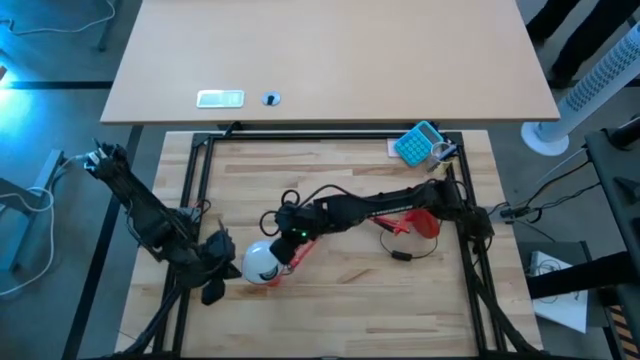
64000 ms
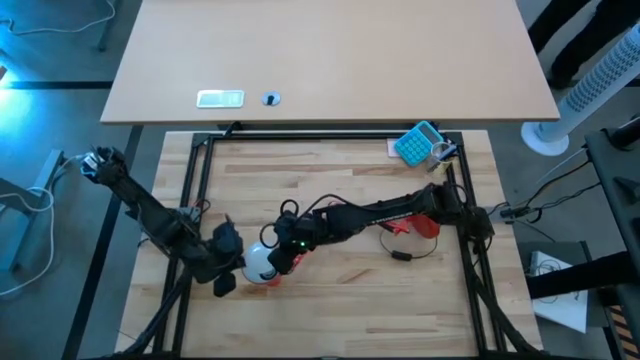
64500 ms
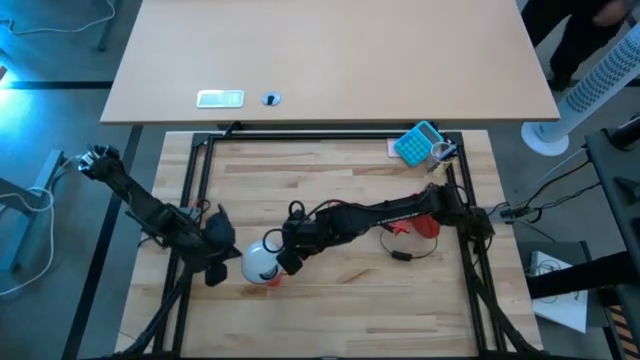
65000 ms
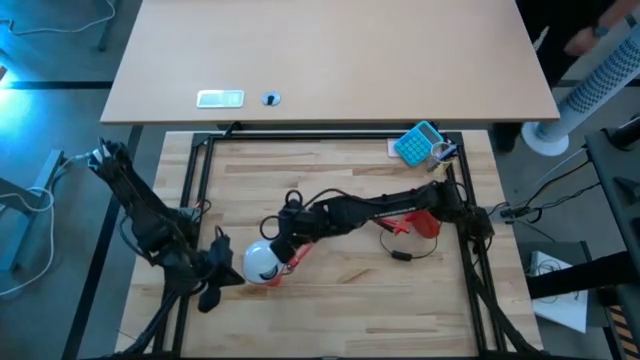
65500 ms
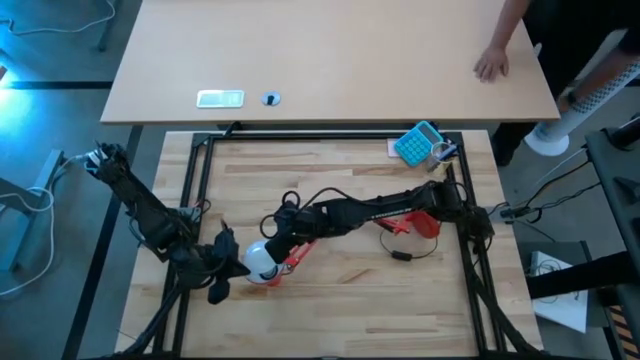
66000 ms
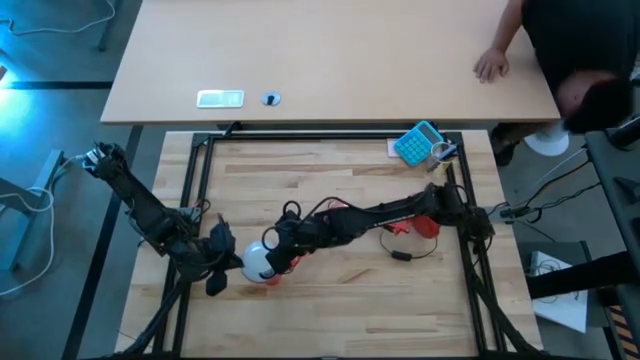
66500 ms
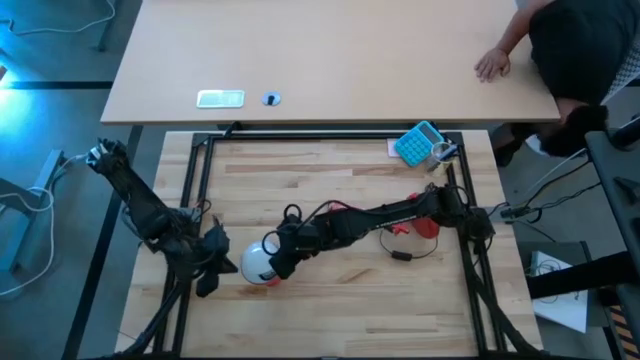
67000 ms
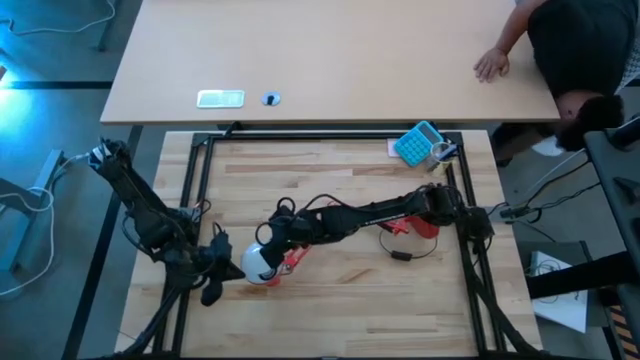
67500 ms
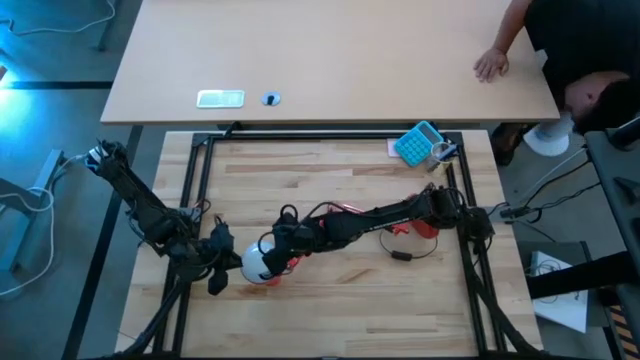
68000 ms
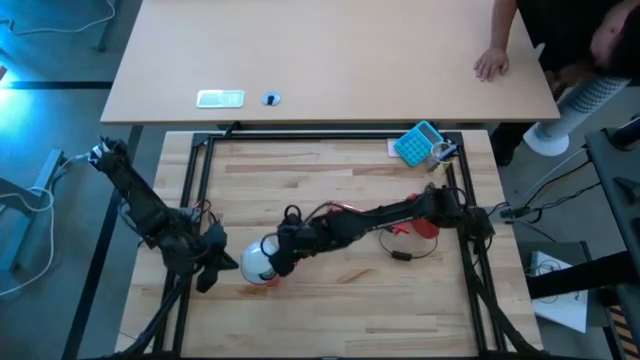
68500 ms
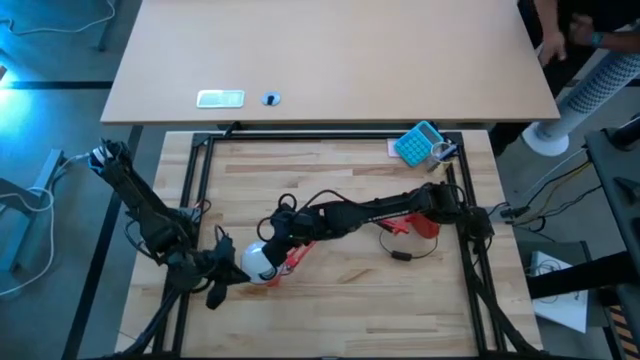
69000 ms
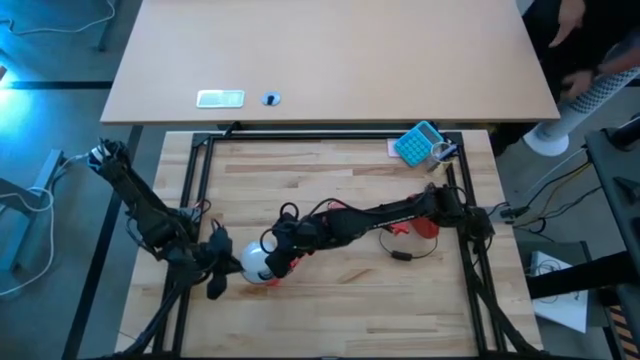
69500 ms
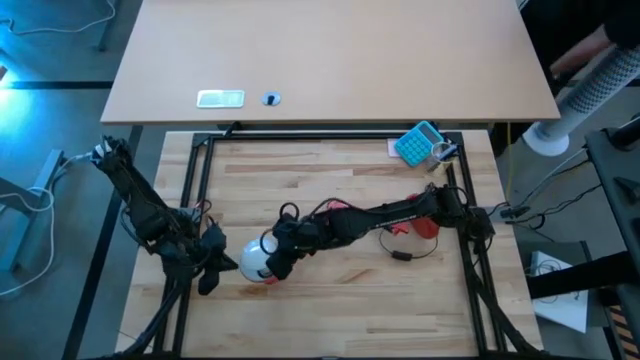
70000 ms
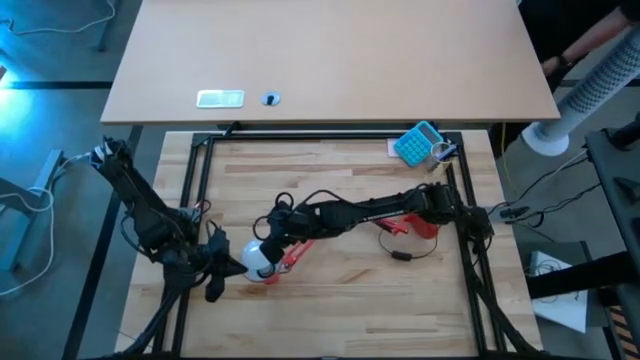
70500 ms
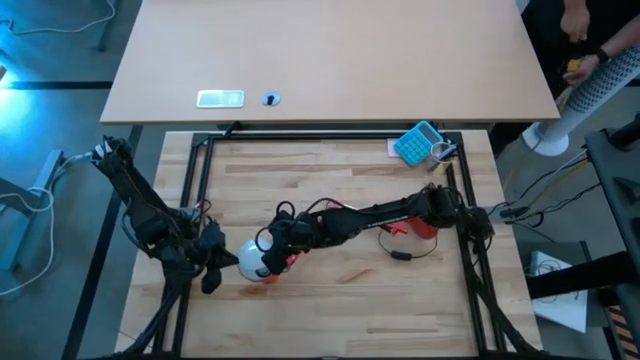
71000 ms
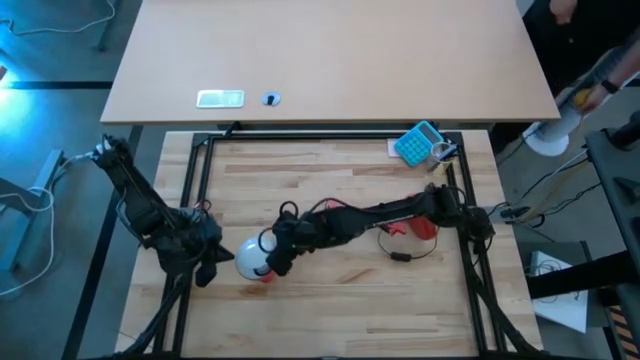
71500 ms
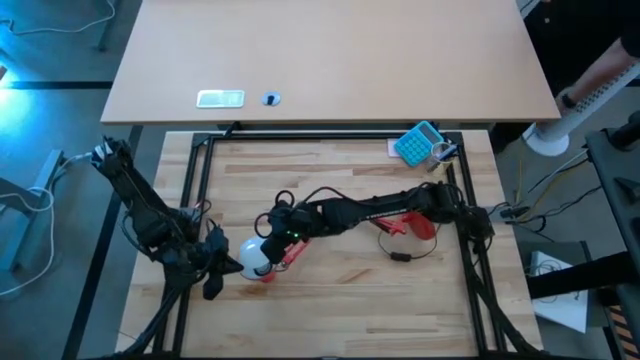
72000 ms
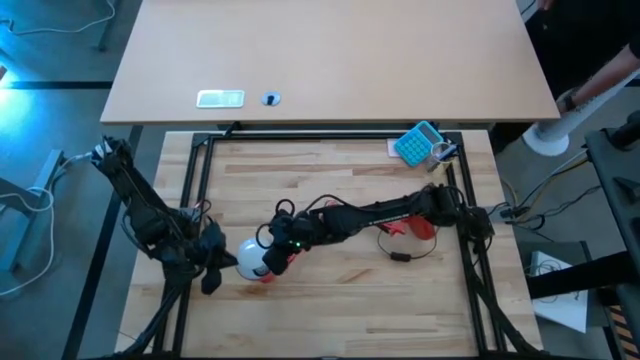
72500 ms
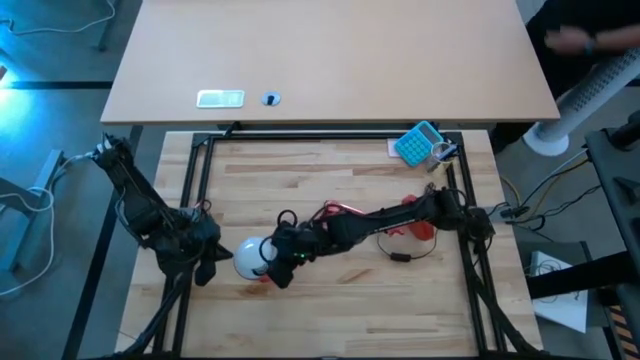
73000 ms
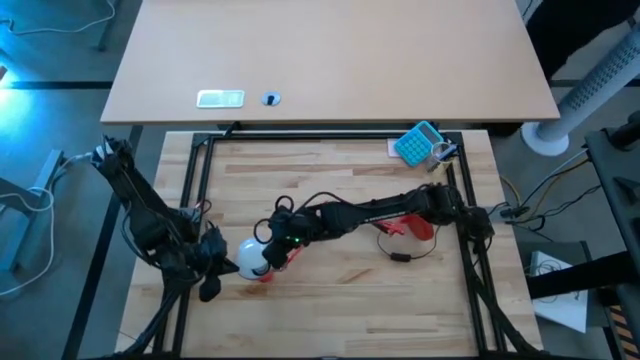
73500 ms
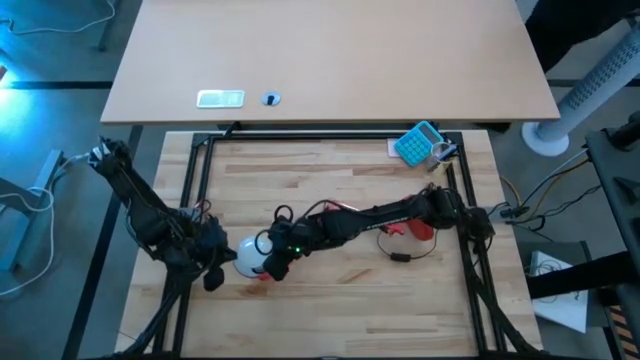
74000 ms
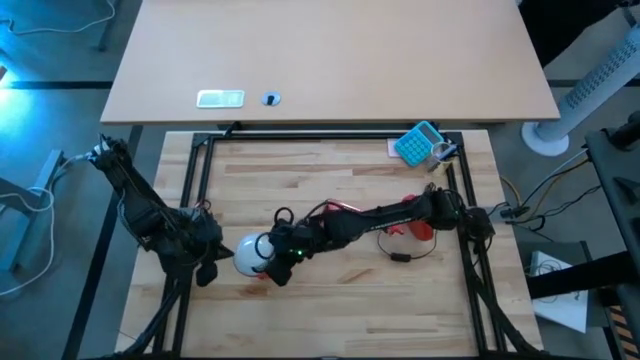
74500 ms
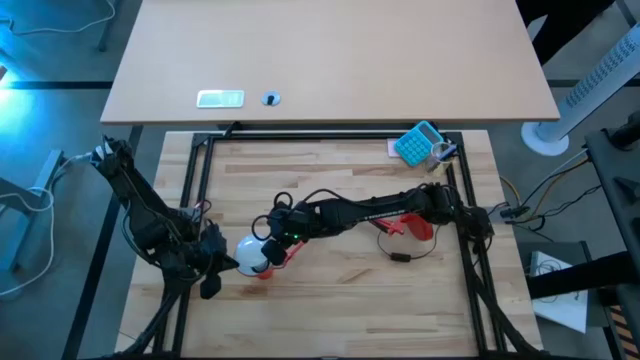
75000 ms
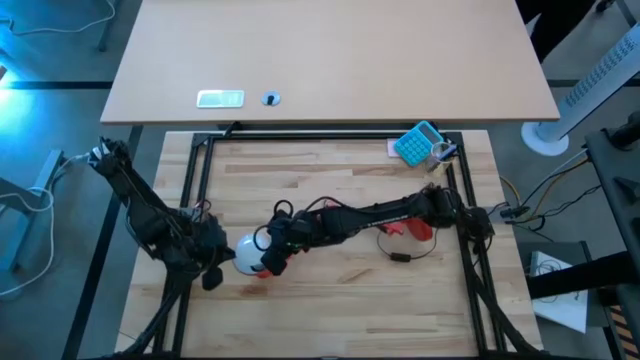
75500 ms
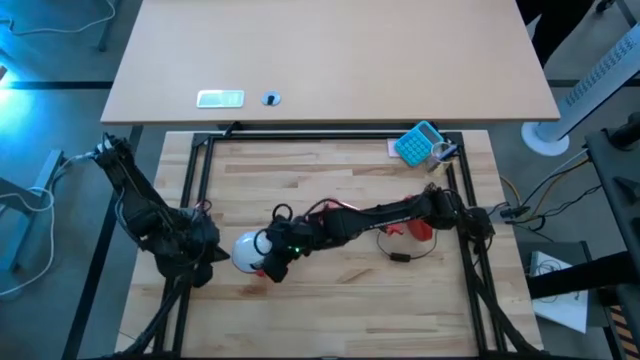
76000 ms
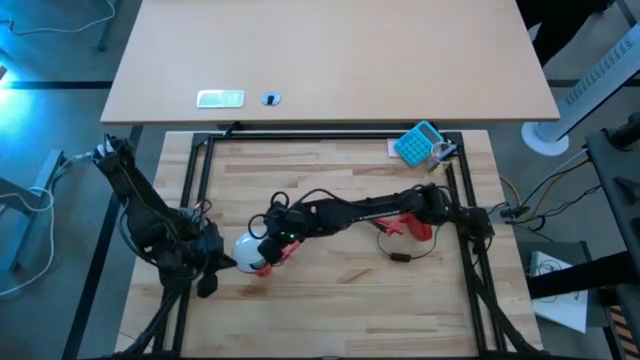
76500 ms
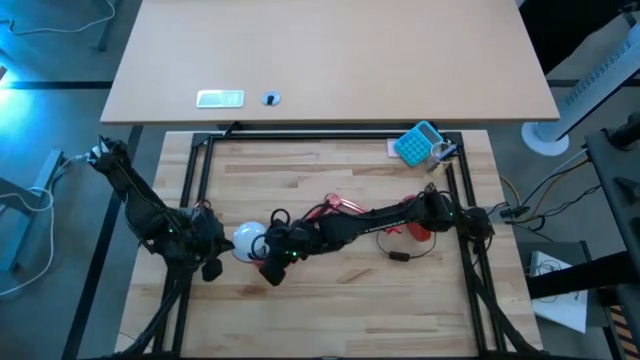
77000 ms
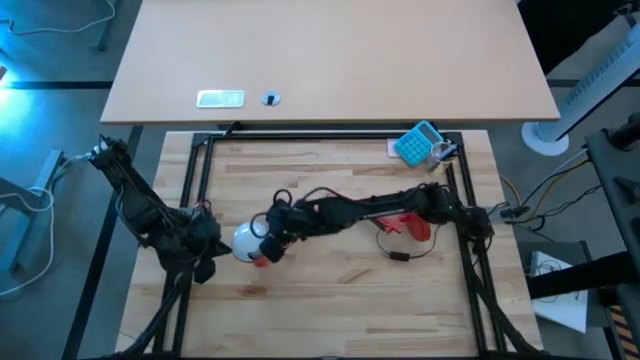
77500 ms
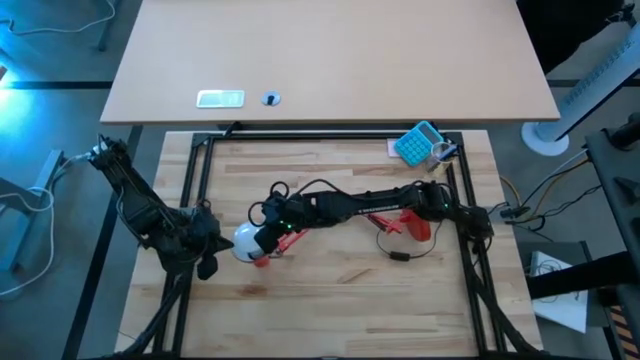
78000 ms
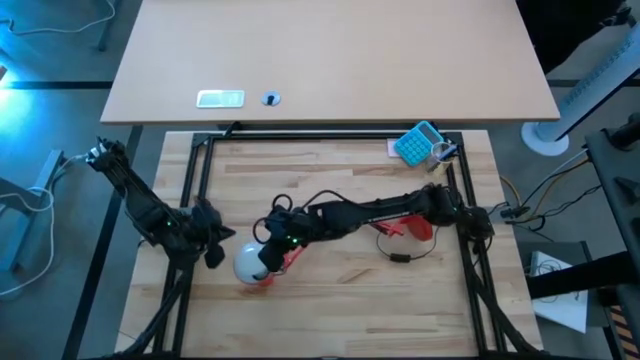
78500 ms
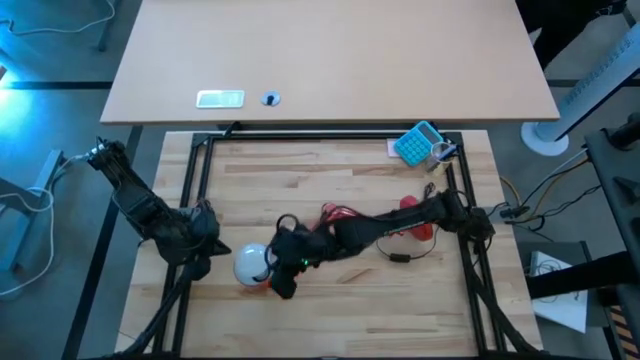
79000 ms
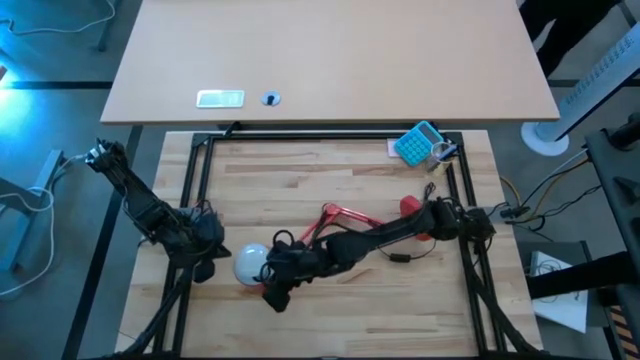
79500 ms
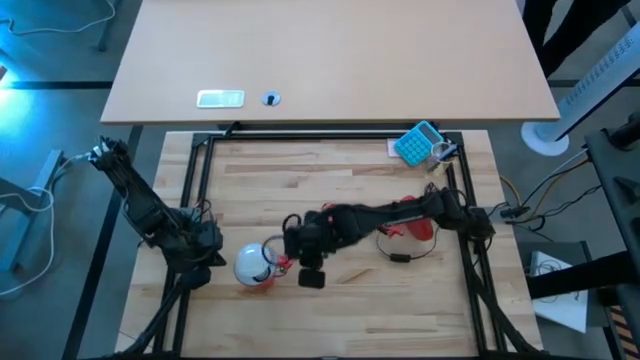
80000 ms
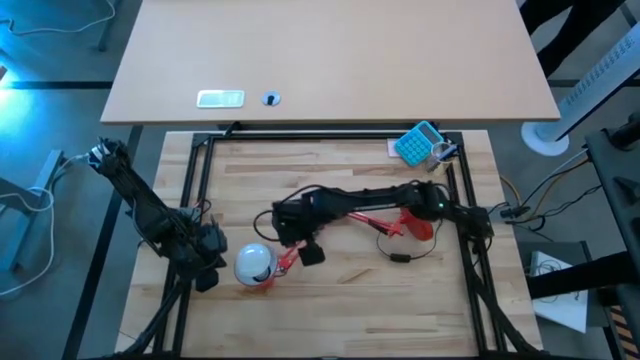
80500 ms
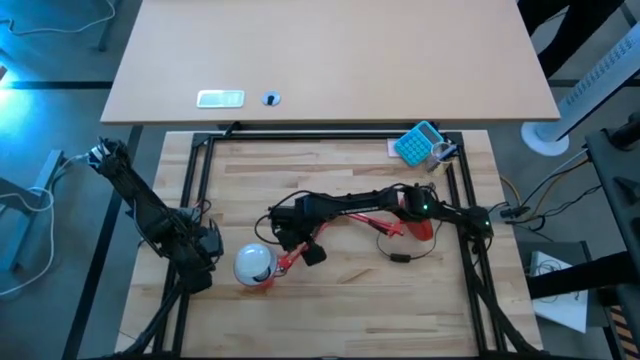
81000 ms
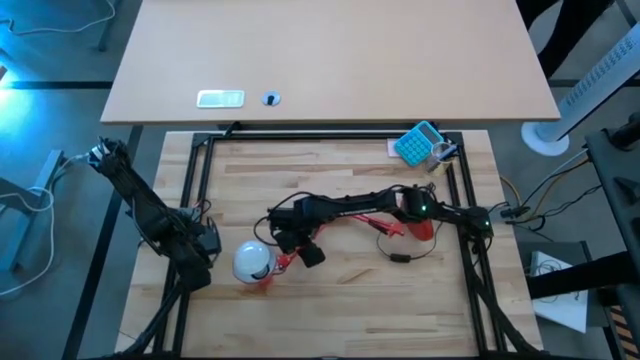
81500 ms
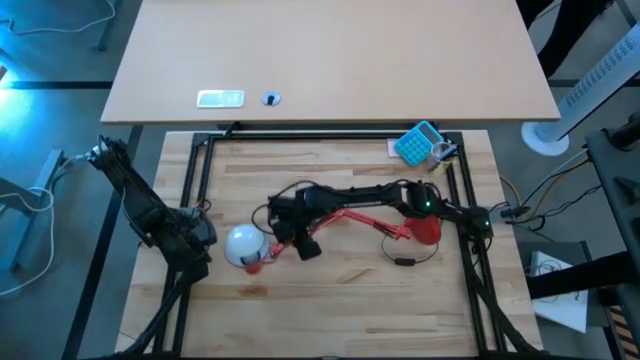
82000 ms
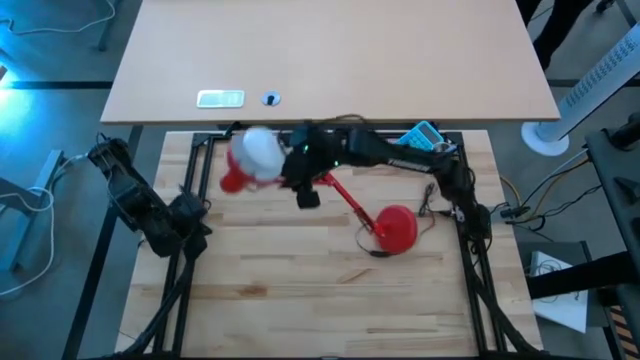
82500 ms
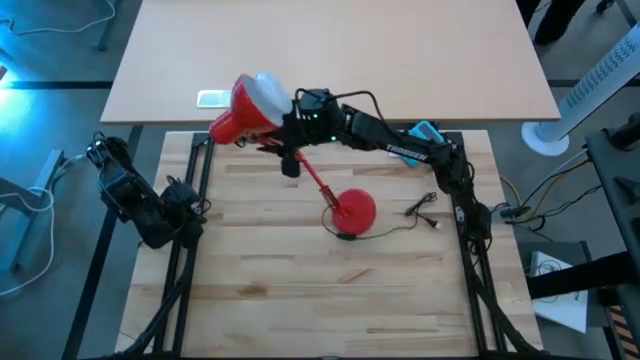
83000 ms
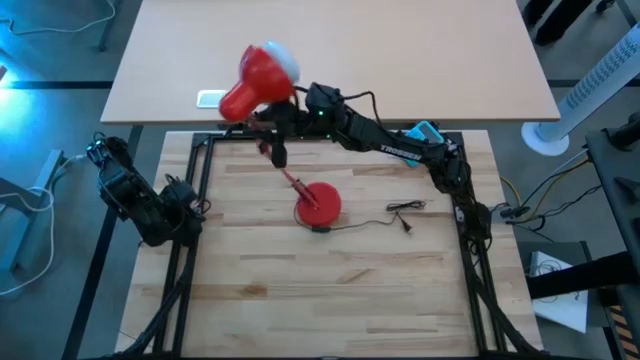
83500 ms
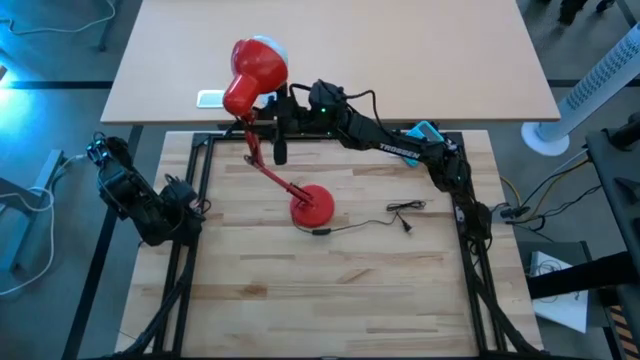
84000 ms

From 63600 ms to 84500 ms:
Task: Screw lightbulb
Insert the lightbulb into the orange desk lamp
